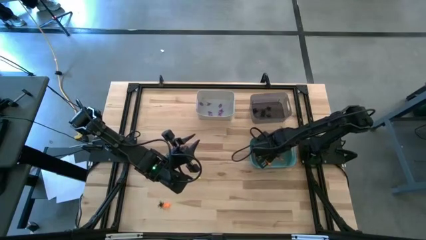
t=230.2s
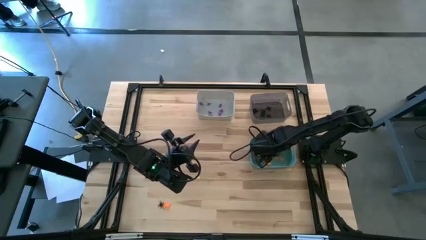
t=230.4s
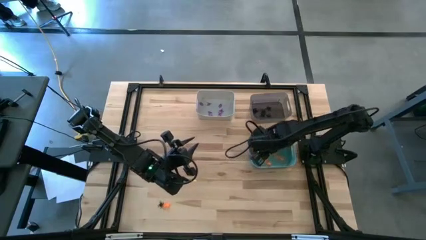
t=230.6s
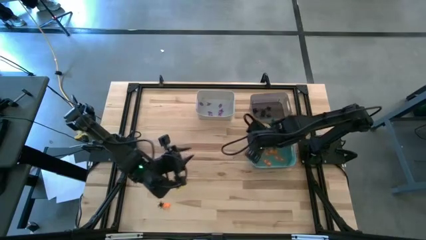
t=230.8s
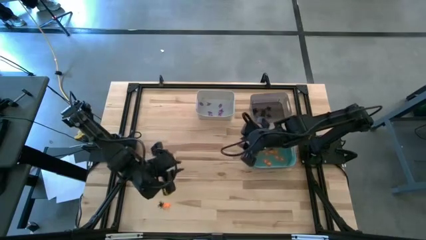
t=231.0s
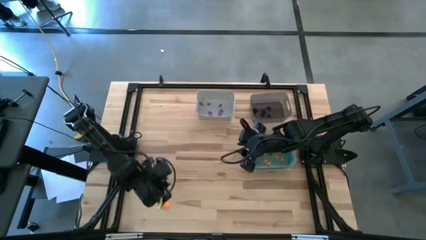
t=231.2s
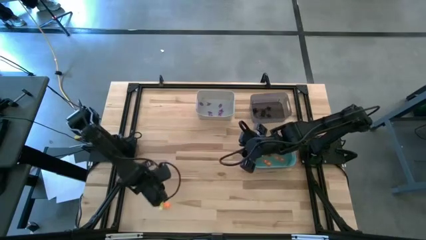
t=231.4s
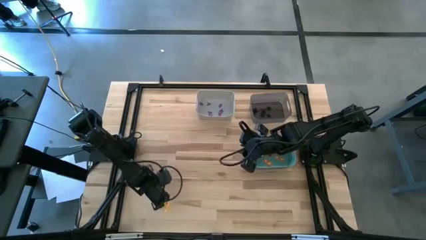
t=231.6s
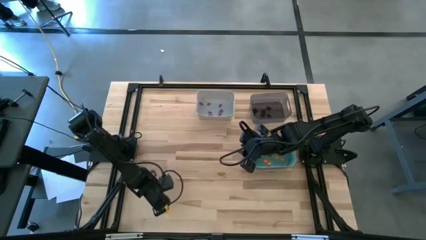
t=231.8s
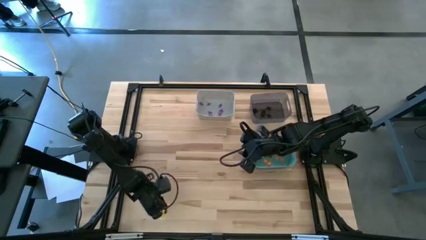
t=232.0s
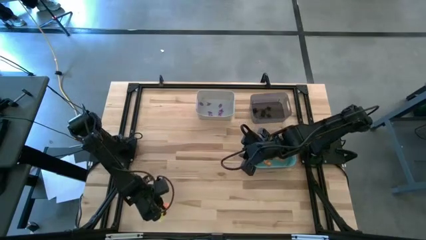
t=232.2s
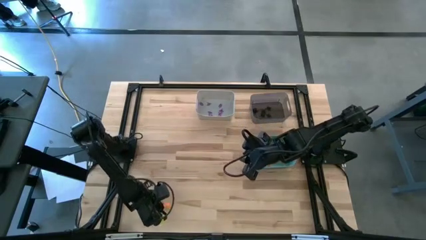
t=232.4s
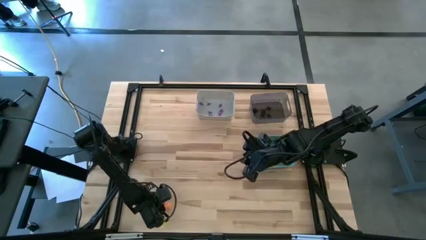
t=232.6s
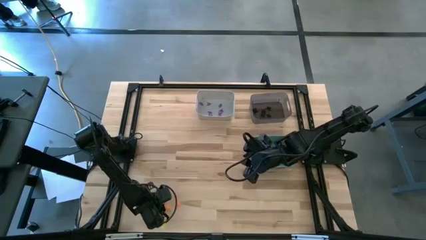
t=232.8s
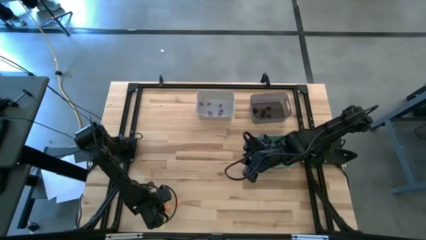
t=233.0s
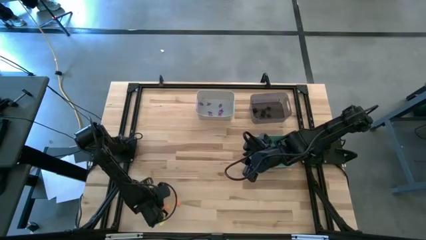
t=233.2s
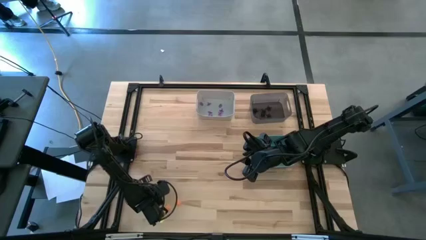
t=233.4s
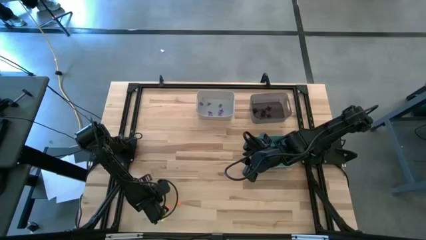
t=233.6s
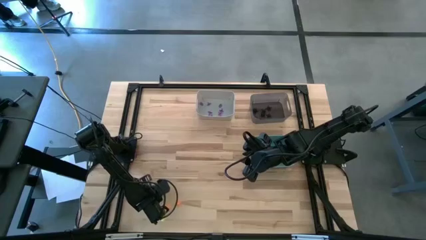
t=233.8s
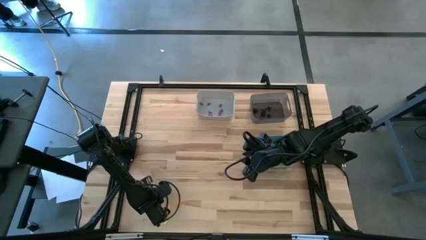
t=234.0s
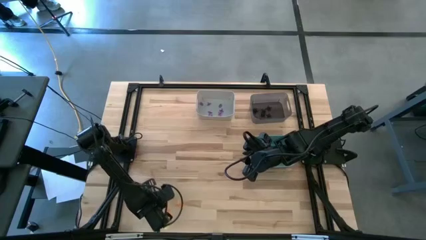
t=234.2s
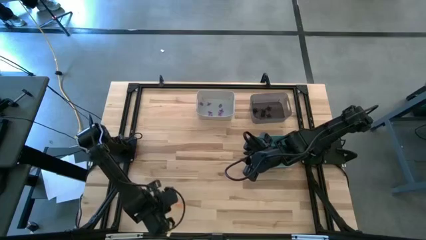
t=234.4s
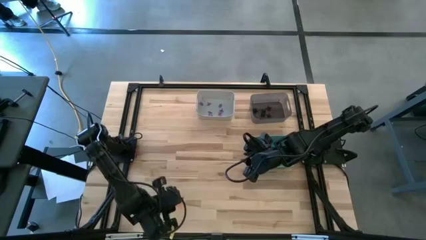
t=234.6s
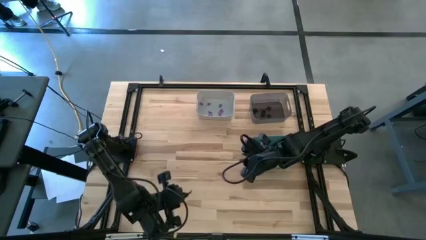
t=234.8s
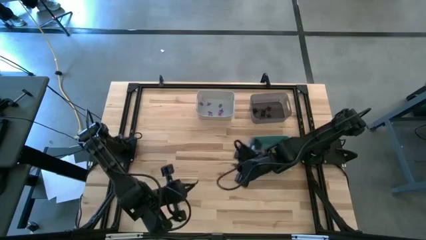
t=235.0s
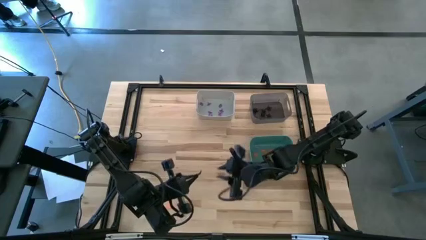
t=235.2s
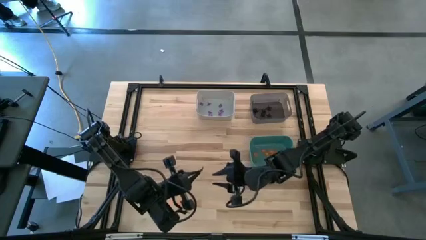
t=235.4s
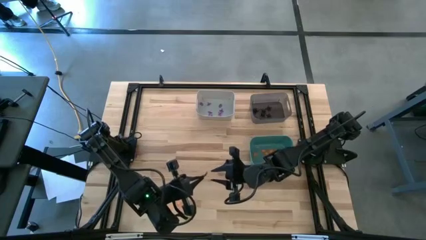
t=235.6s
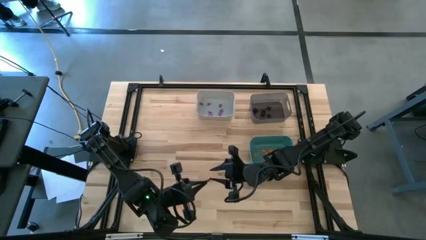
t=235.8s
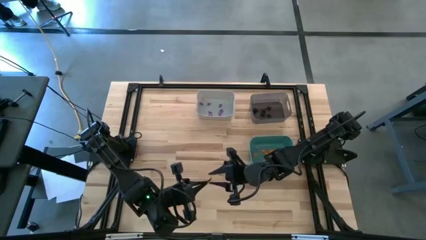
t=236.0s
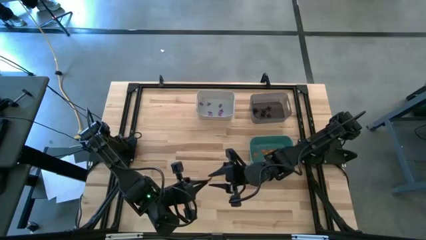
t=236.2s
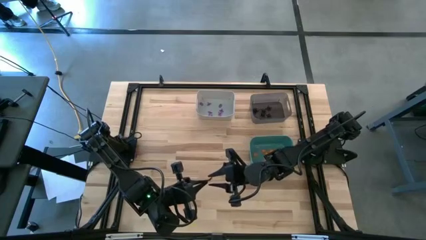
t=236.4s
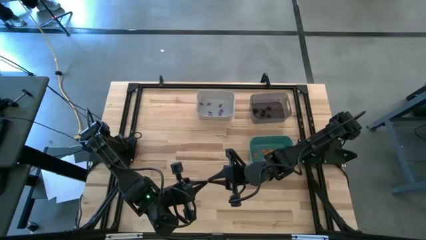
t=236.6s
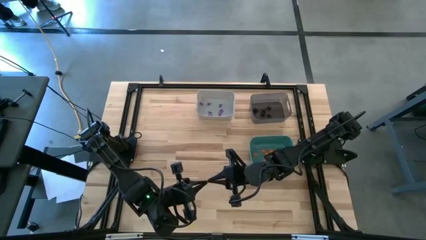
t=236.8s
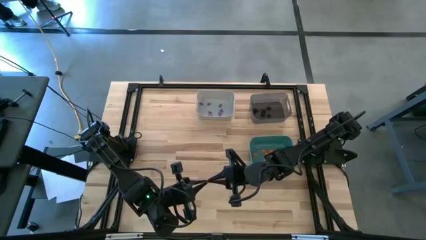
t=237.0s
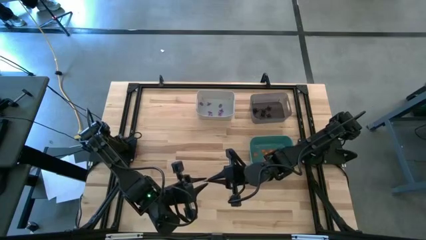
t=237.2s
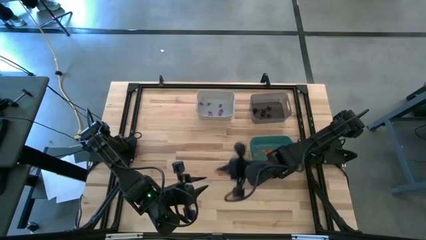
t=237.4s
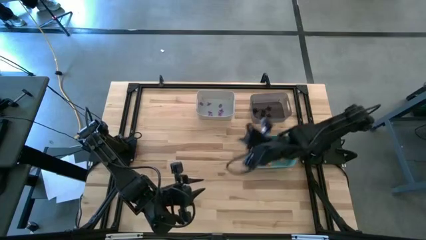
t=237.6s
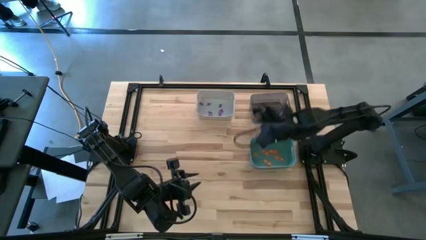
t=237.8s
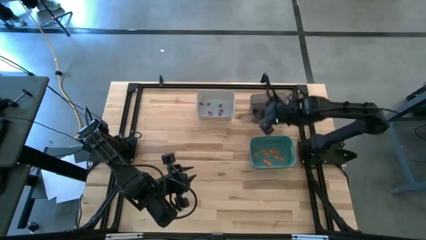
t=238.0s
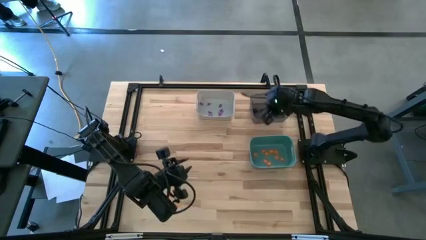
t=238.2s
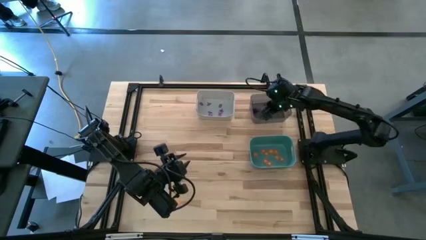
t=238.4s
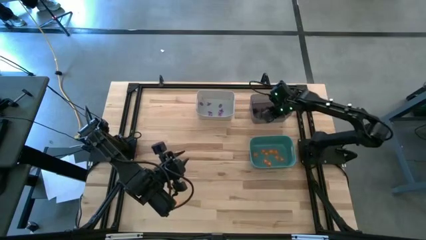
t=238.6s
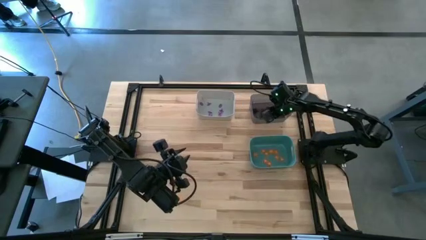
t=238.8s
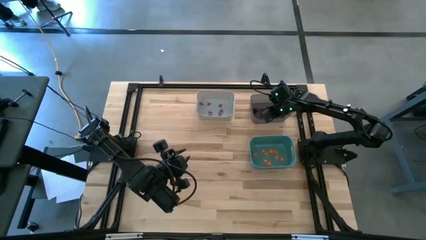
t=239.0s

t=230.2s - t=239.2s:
Task: Sort Halloween decoration
Put the black spider toy into the black bin

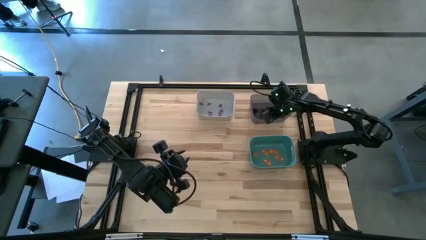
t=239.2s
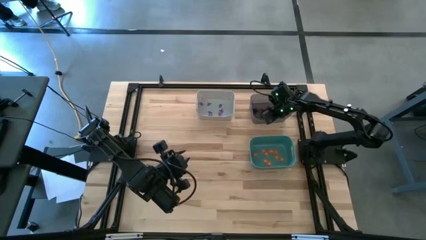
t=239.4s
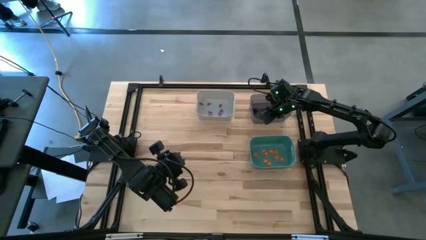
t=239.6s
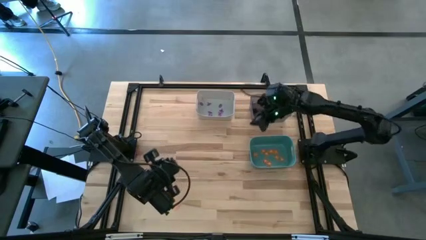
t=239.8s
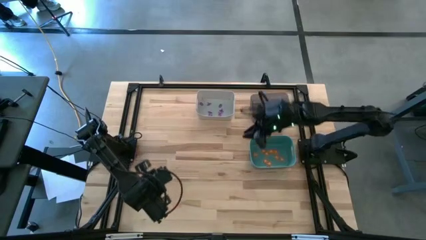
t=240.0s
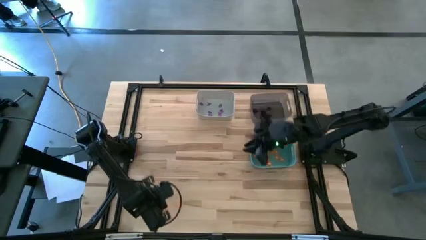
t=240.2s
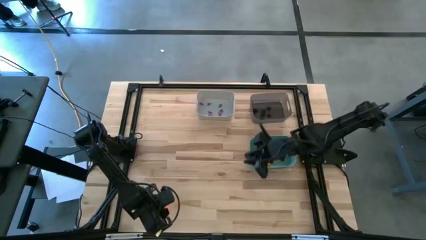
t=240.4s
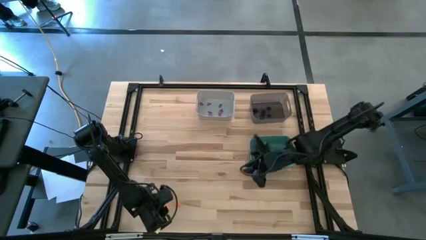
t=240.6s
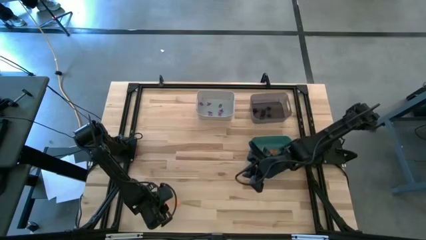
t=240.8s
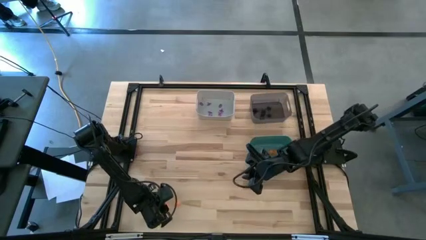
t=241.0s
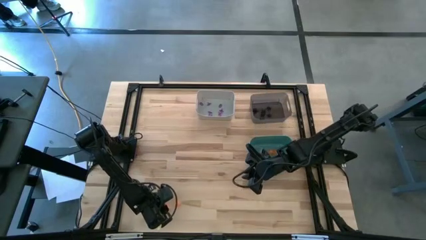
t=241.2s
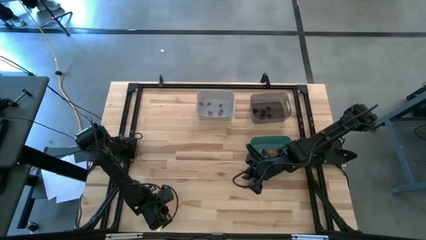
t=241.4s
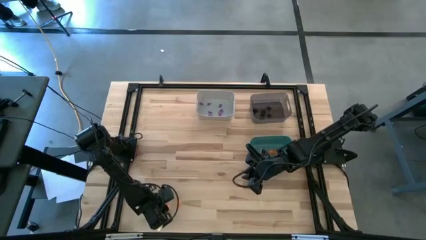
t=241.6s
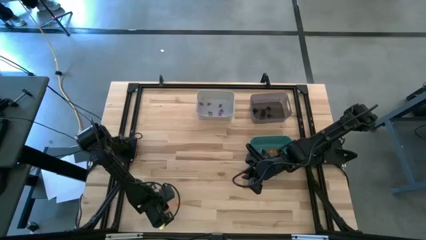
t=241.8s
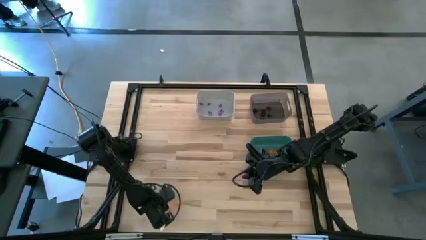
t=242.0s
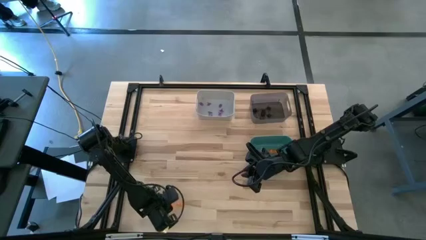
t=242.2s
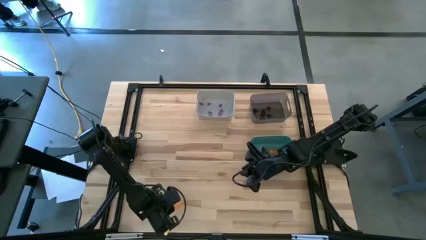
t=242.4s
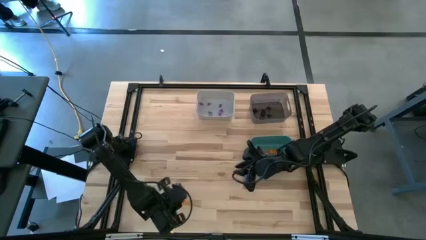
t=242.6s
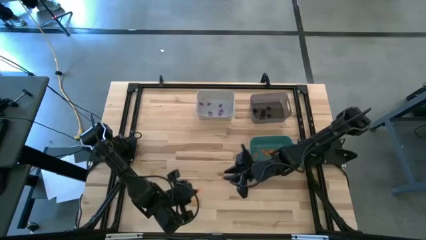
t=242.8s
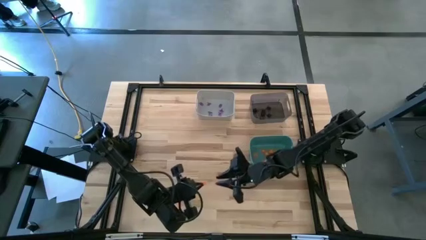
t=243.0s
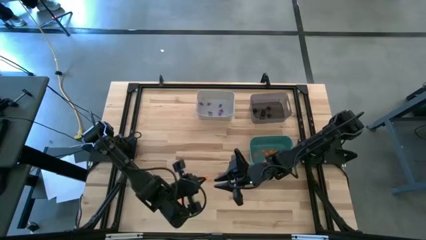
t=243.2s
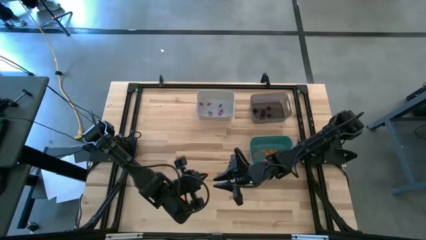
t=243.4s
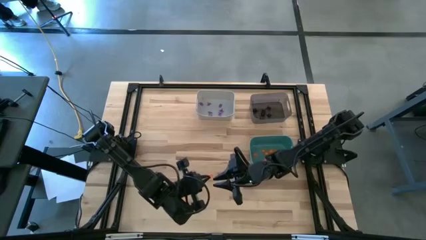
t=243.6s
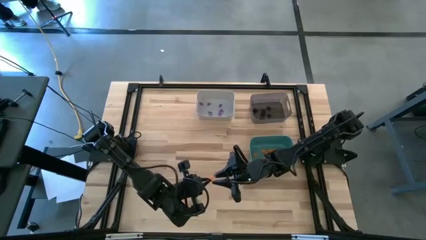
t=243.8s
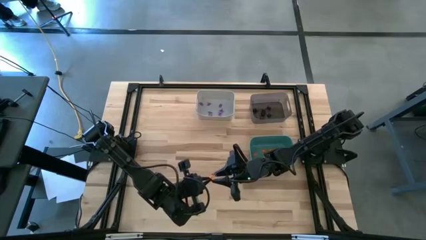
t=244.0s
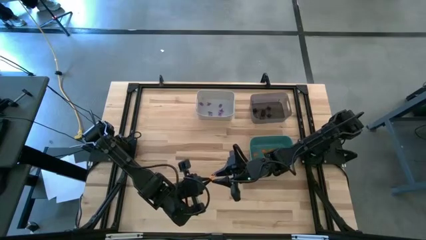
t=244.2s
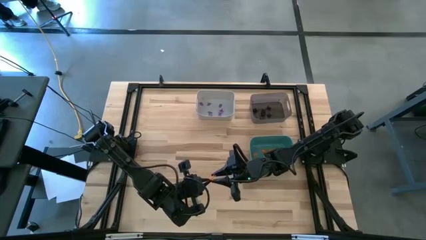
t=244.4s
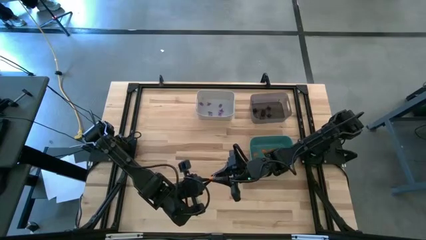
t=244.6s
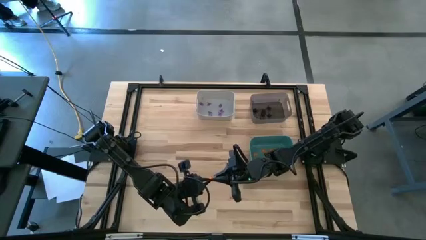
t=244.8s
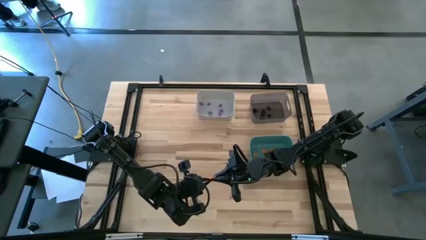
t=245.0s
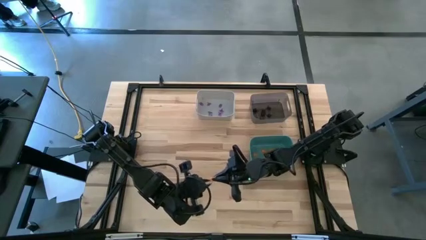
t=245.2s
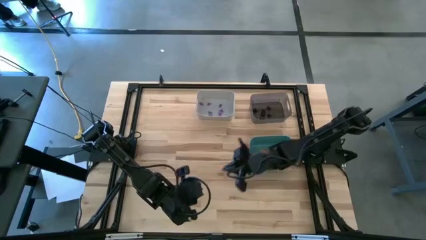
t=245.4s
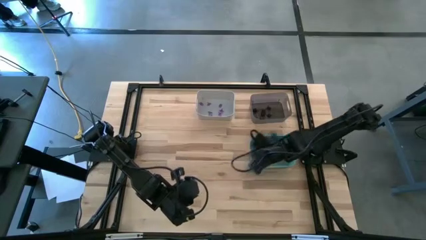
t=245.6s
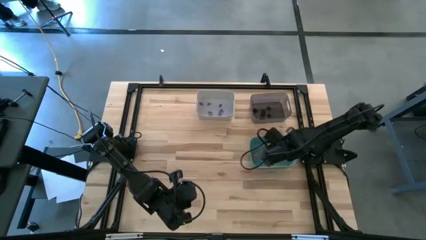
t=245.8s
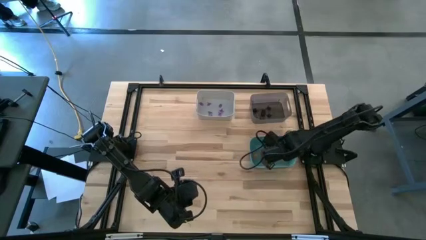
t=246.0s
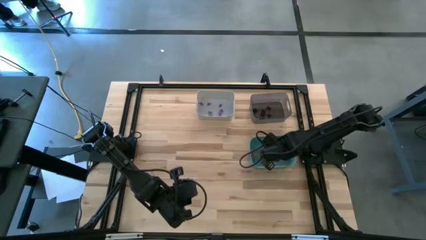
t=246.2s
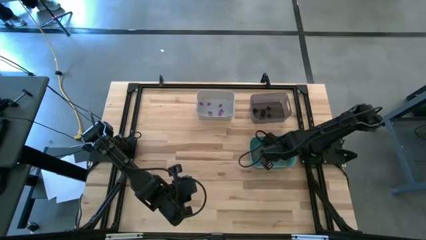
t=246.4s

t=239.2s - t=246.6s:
Put the orange spider toy into the green bin

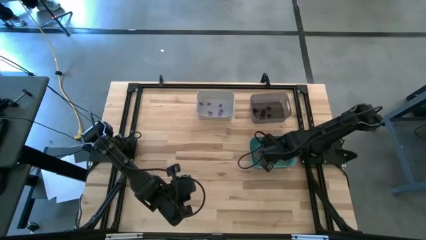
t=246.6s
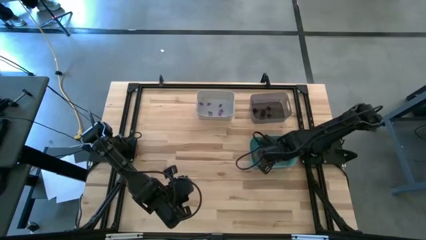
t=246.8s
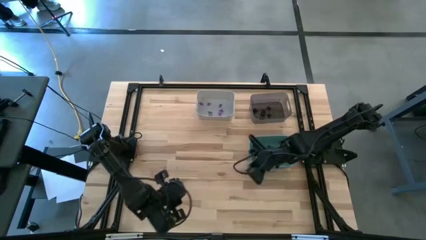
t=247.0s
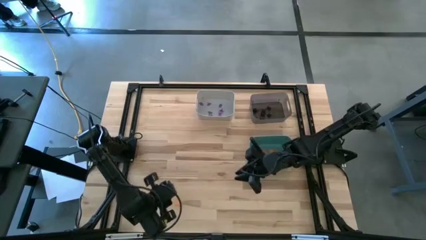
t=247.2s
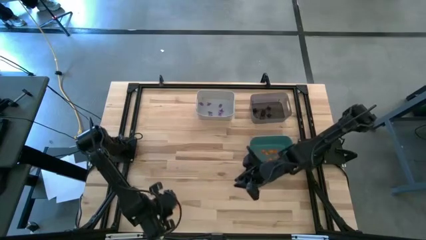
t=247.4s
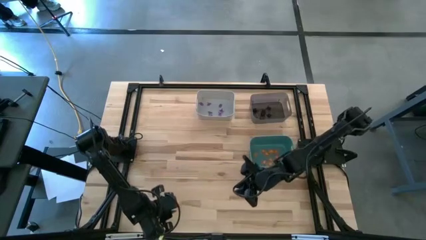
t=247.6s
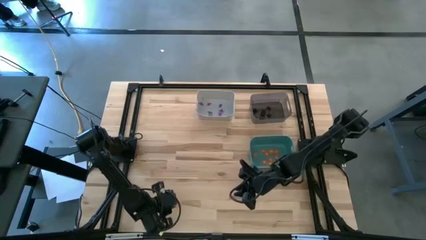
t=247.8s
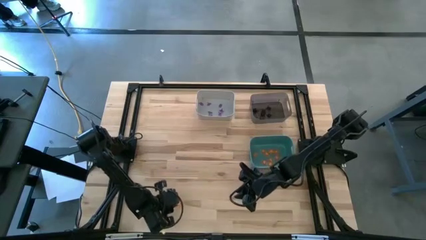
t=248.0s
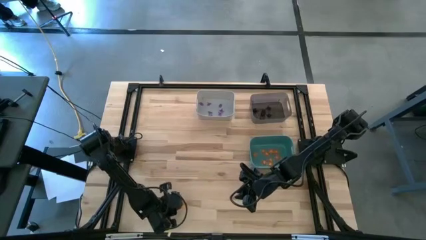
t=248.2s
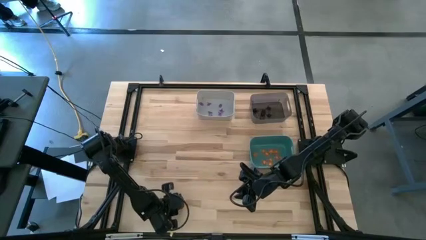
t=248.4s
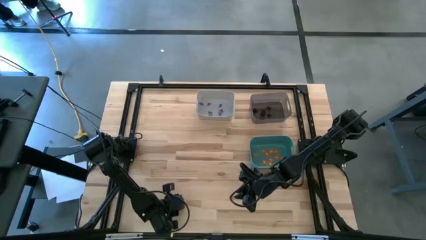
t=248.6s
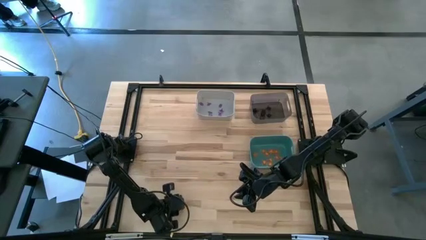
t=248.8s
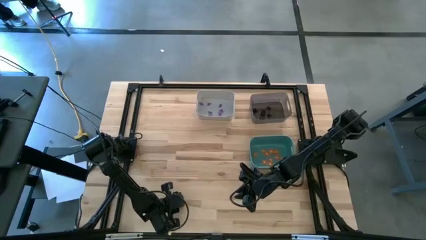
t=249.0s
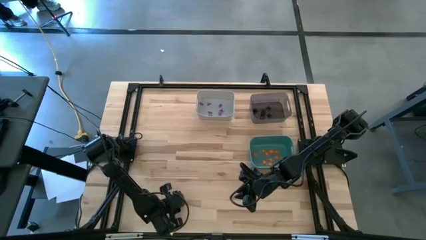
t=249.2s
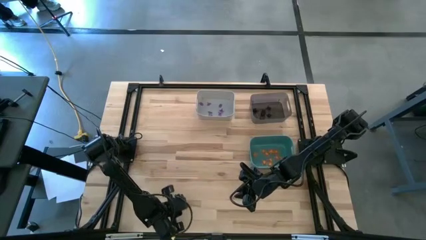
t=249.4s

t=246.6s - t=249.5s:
Put the orange spider toy into the green bin
